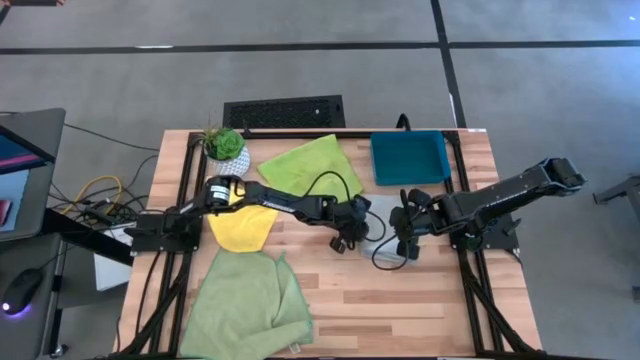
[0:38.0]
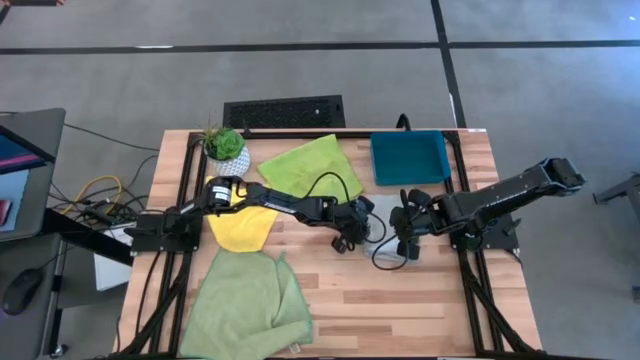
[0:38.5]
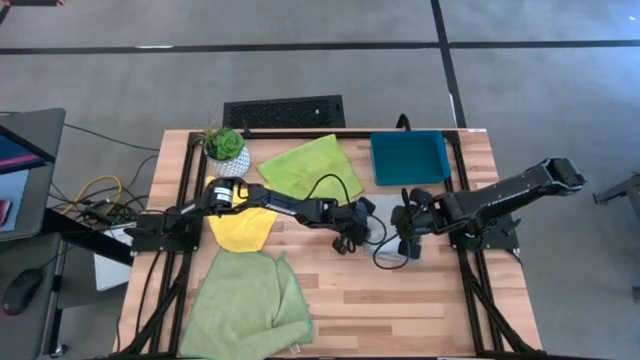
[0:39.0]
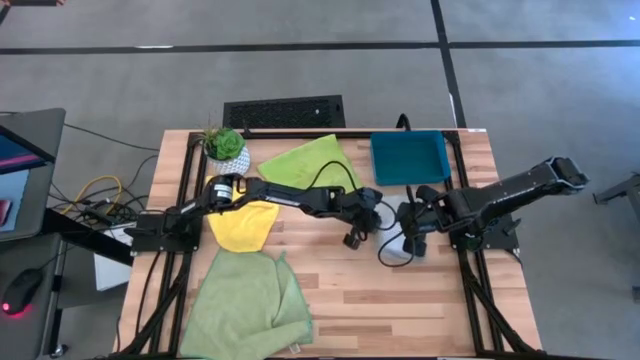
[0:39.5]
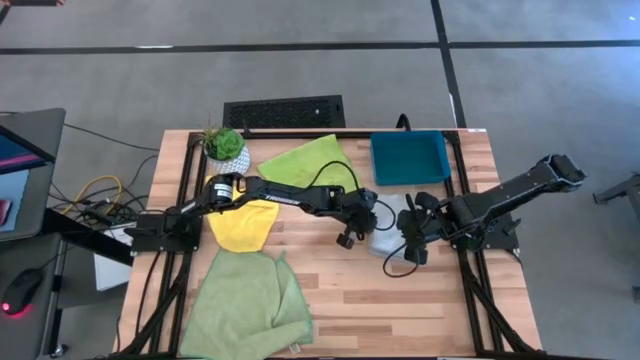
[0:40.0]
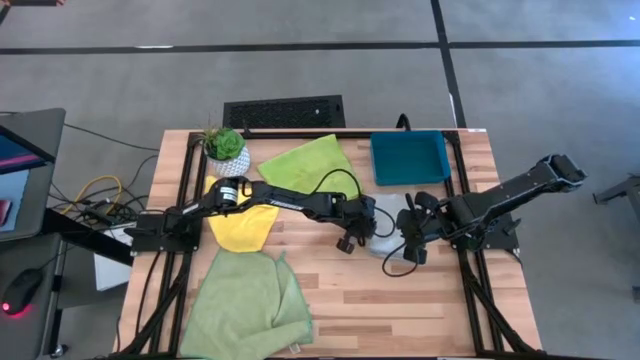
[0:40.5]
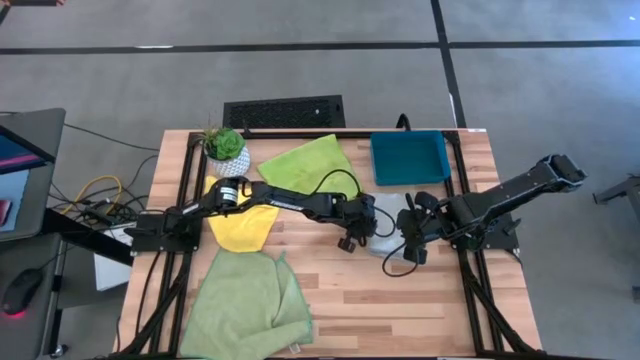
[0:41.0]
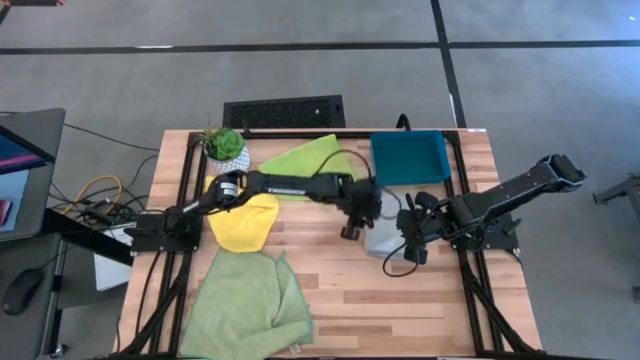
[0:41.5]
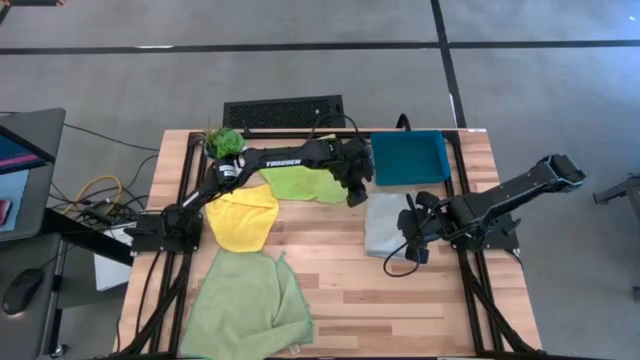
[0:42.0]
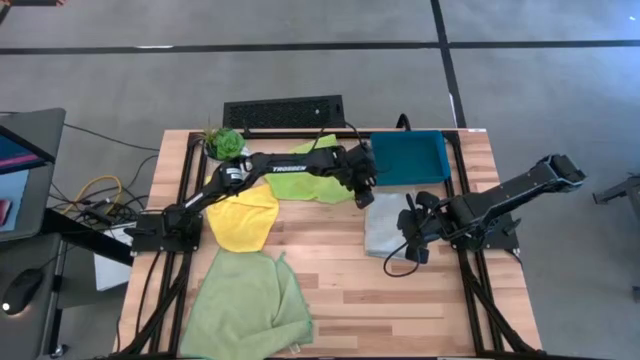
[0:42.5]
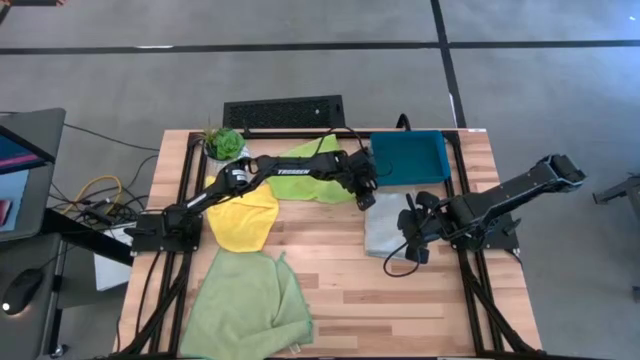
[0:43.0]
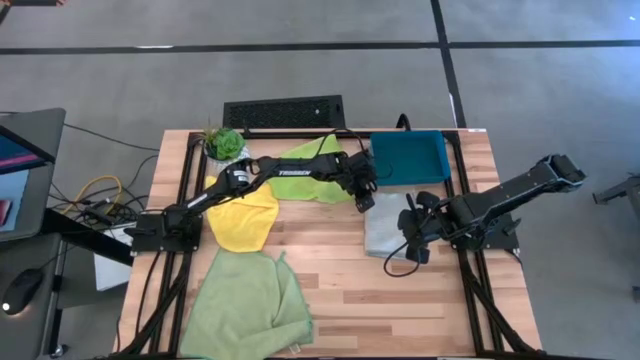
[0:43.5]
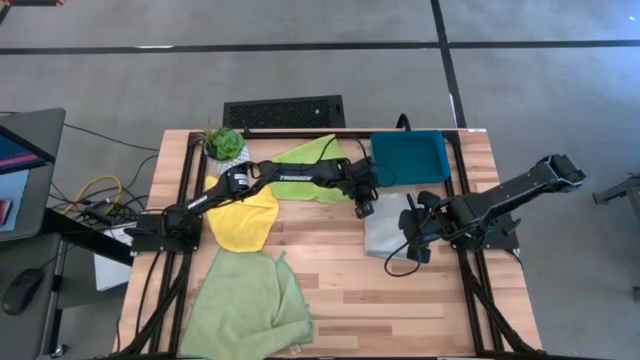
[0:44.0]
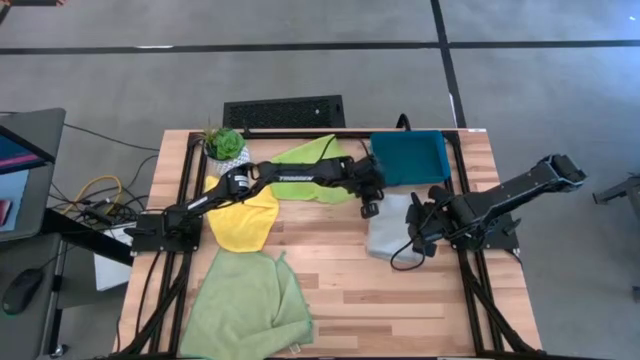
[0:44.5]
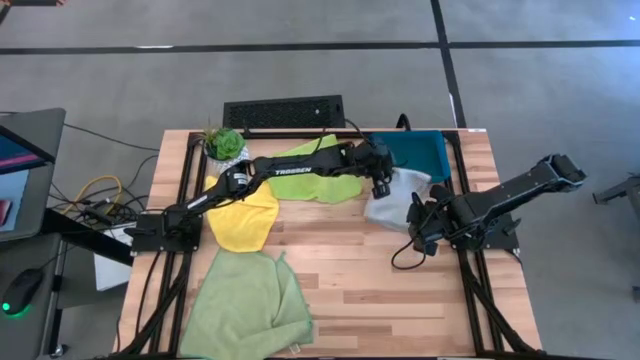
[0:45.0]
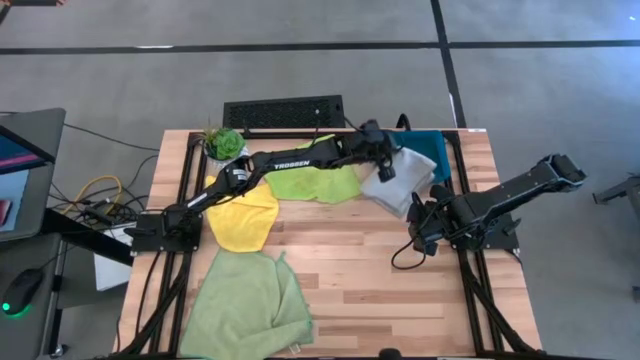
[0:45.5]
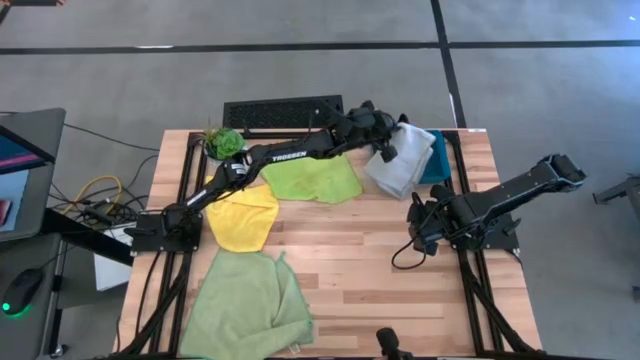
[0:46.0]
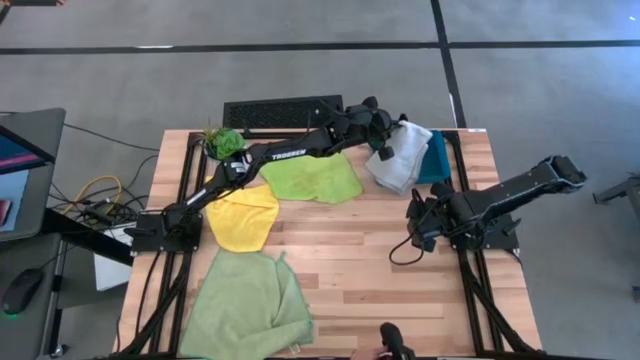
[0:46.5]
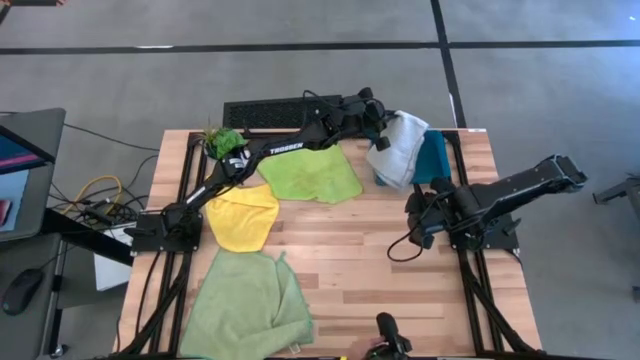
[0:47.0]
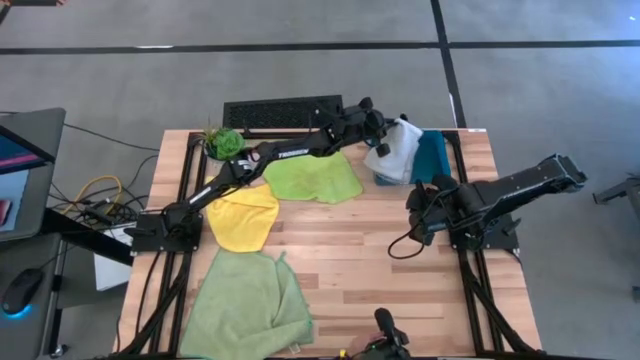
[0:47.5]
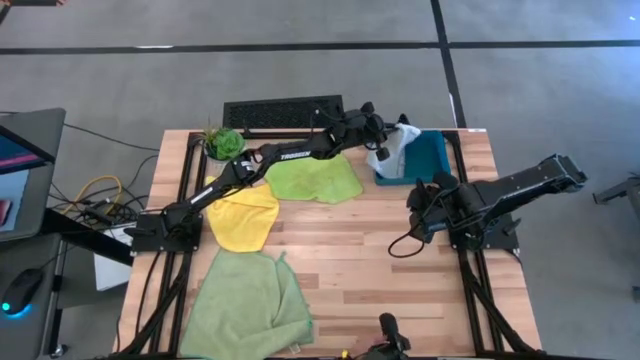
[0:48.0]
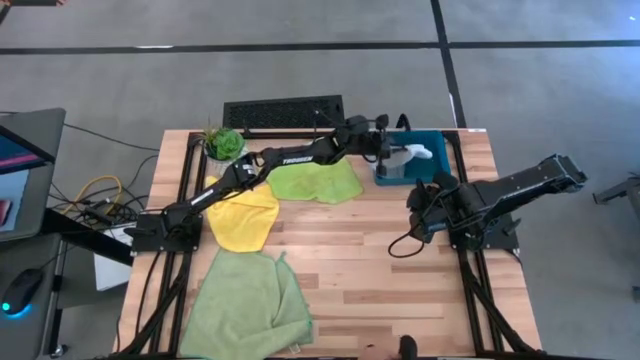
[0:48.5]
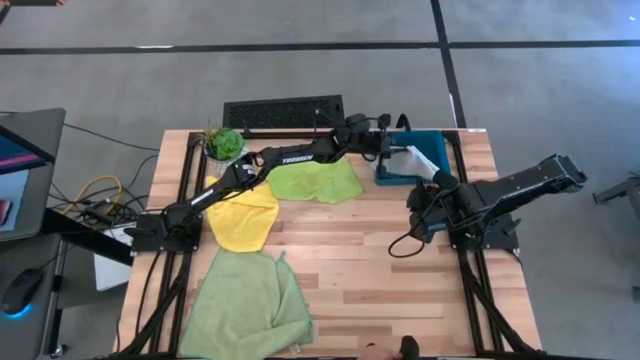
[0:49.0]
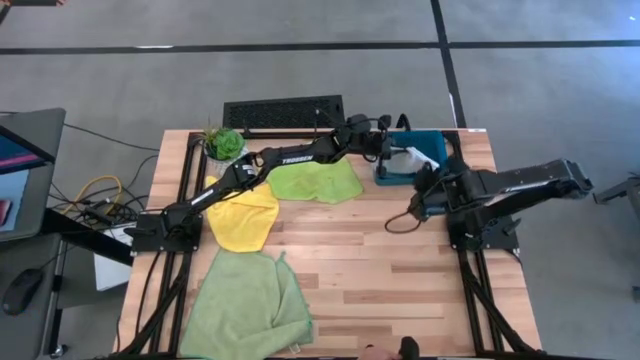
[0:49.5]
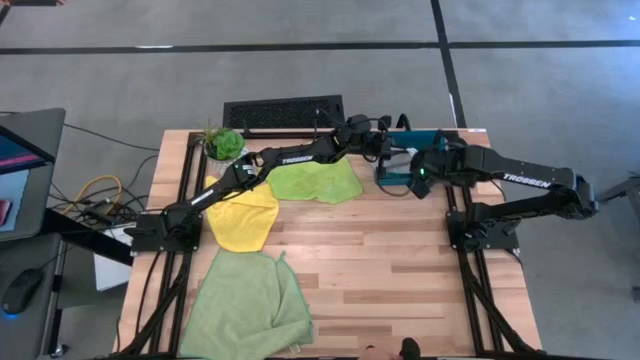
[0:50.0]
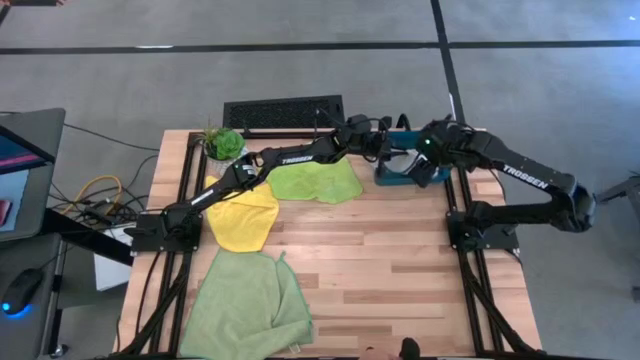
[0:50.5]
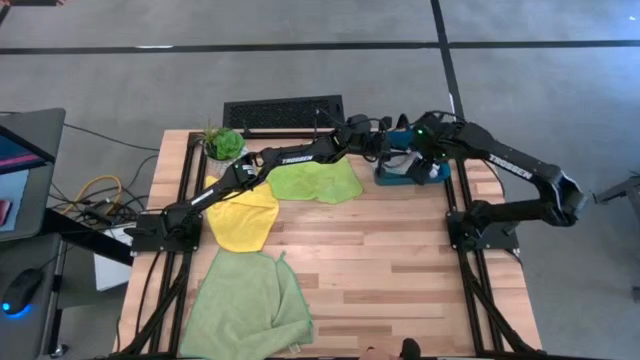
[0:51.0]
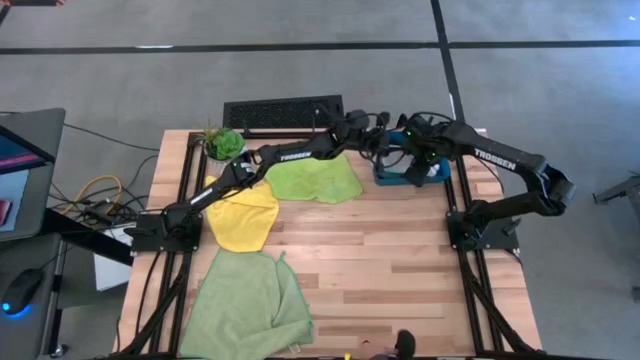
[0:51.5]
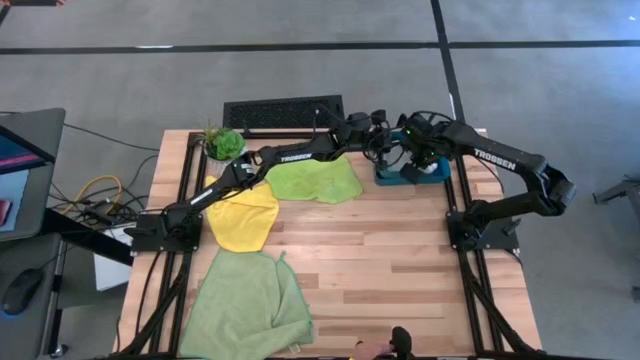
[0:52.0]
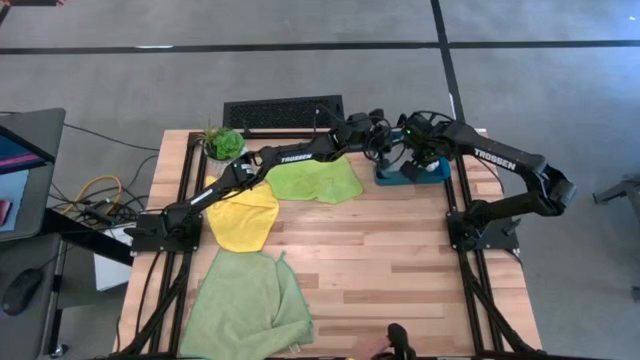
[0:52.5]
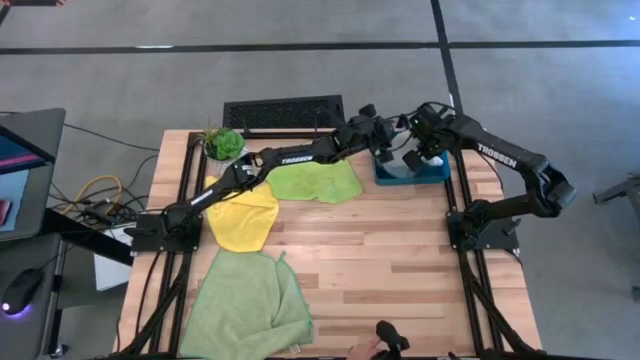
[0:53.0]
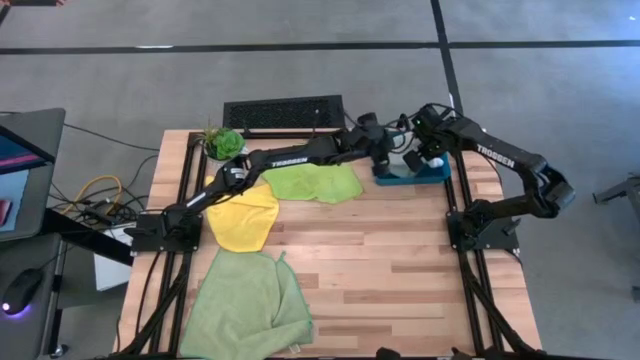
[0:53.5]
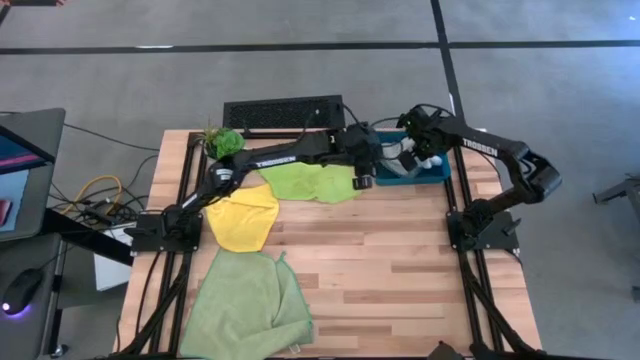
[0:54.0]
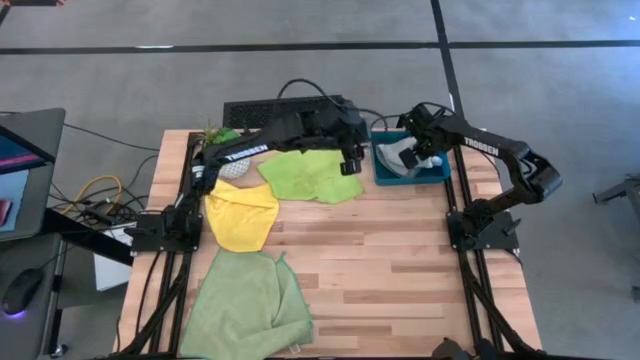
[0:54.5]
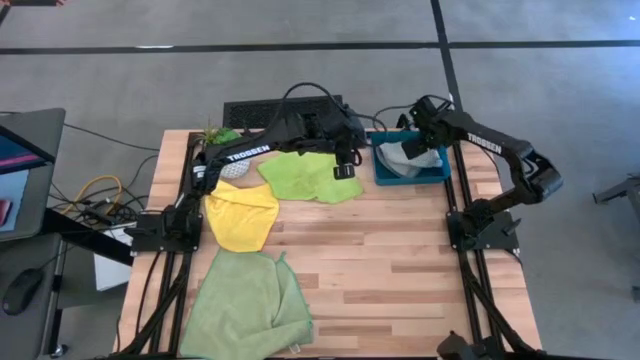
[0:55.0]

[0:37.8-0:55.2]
Task: Fold microfiber towels
Put the gray microfiber towel into the blue bin

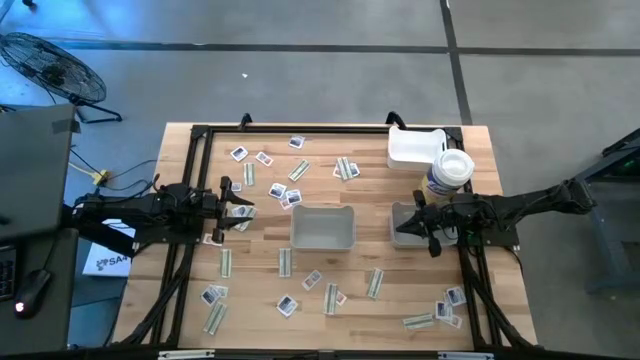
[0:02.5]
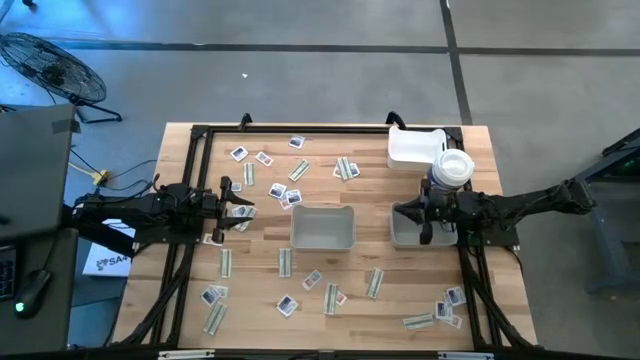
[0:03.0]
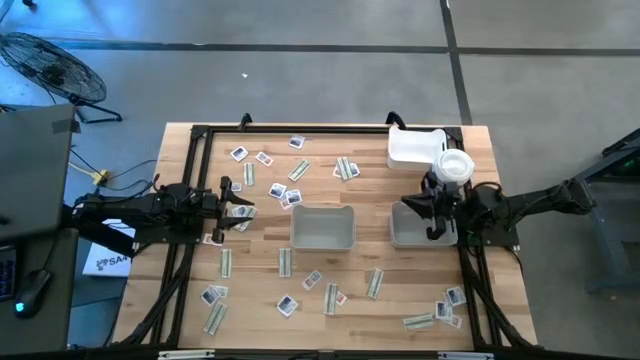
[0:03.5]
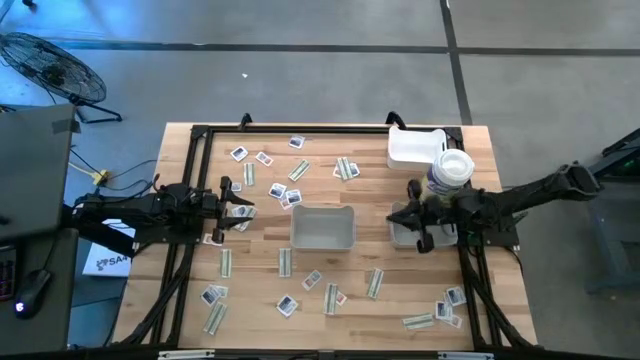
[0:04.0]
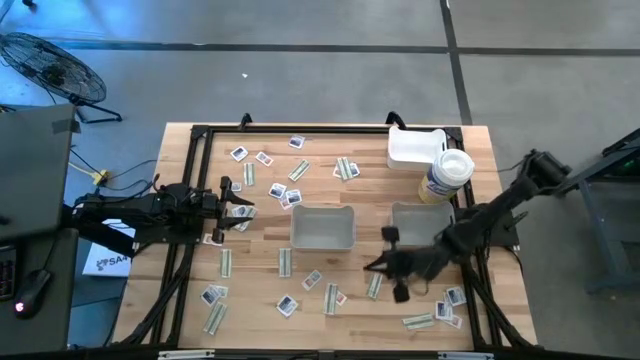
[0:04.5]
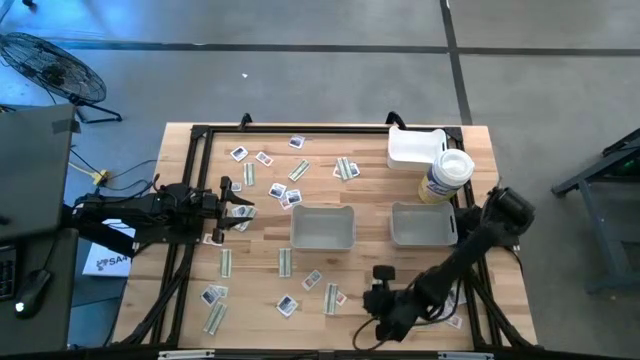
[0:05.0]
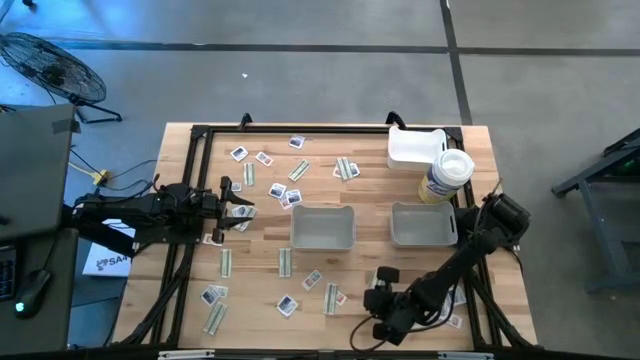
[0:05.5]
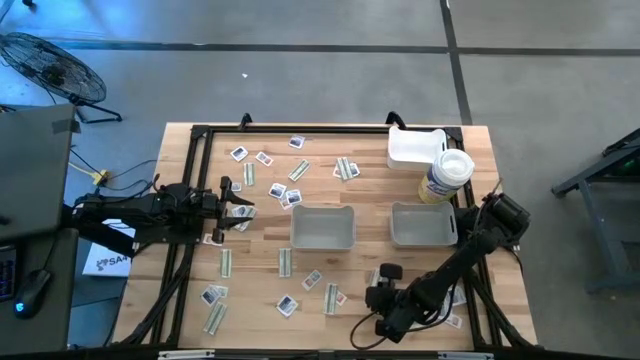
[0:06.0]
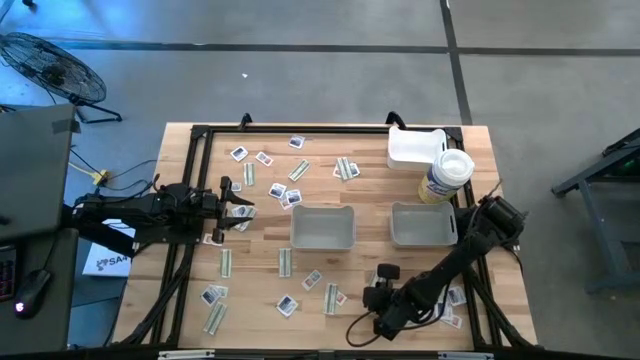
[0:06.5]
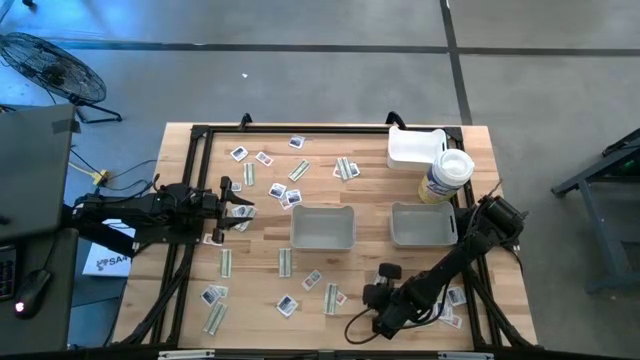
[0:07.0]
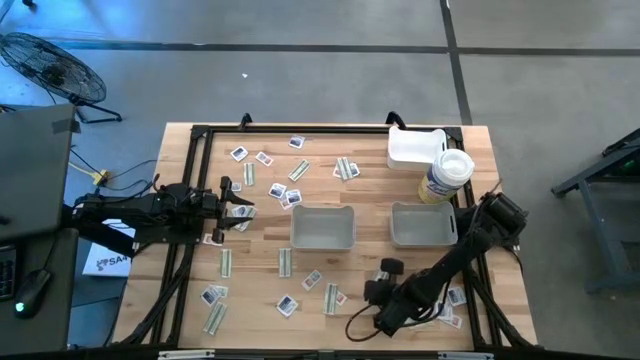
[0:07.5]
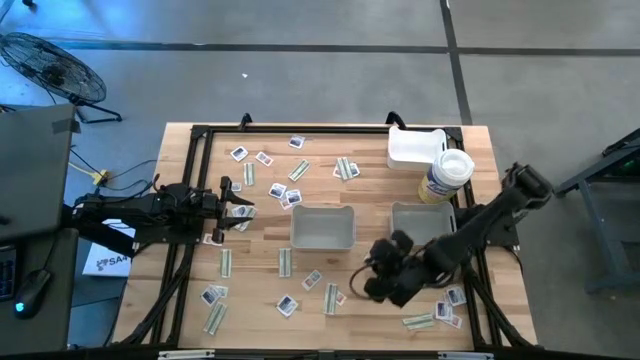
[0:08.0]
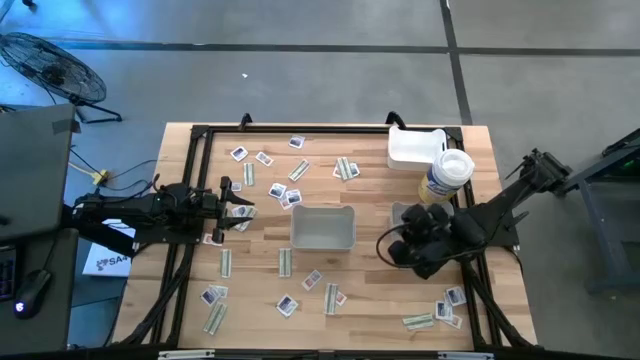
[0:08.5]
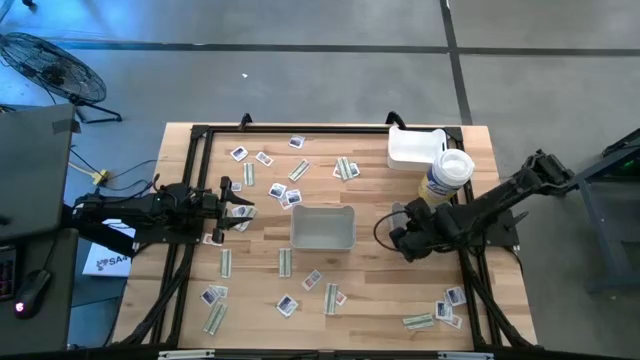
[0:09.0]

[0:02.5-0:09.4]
Task: Pick & Place First Aid Supplies
Put the green pad into the right gray bin
